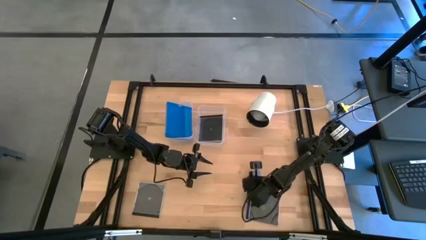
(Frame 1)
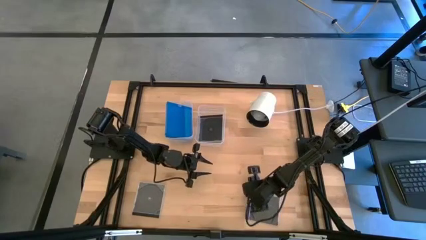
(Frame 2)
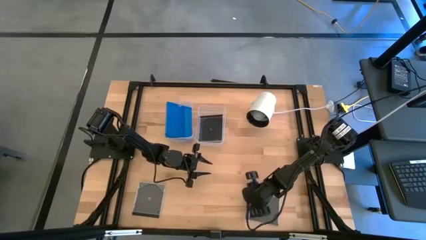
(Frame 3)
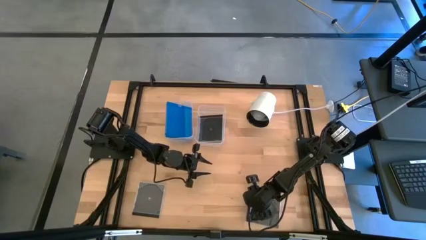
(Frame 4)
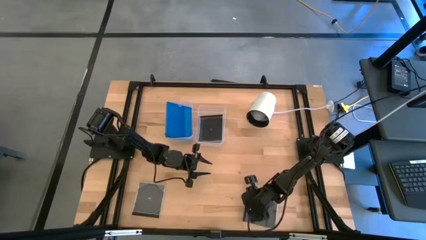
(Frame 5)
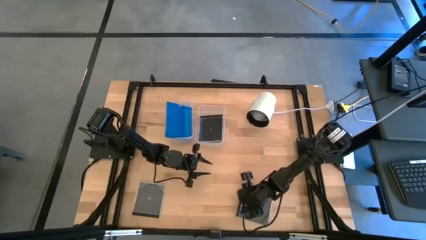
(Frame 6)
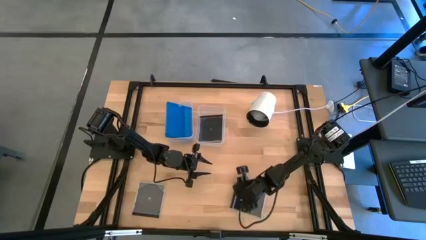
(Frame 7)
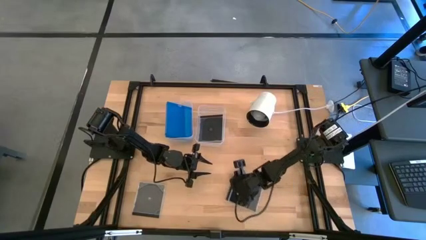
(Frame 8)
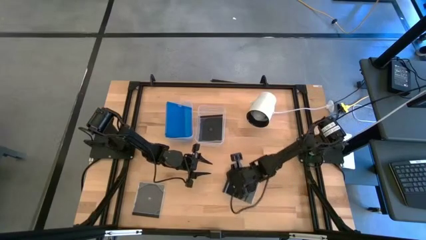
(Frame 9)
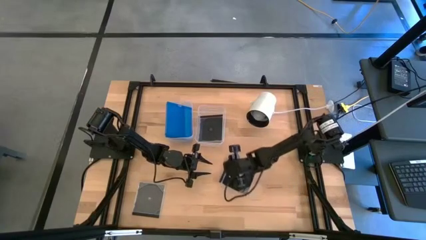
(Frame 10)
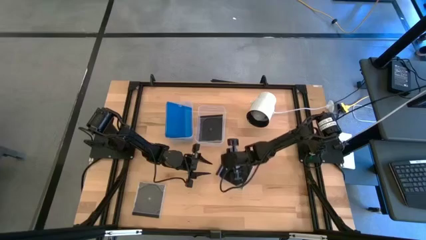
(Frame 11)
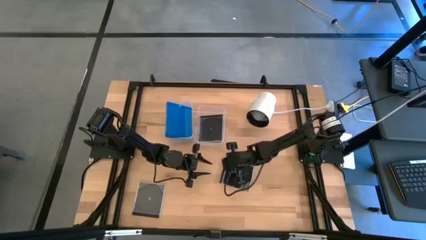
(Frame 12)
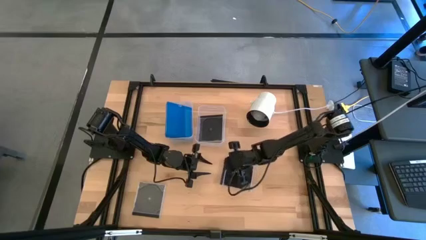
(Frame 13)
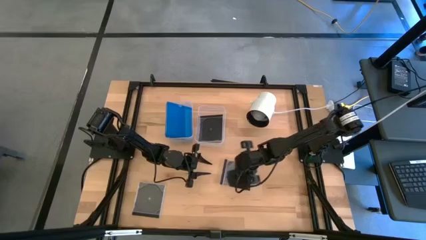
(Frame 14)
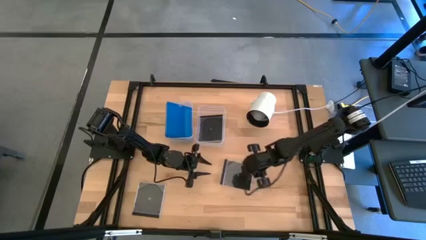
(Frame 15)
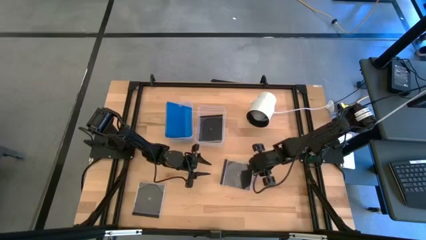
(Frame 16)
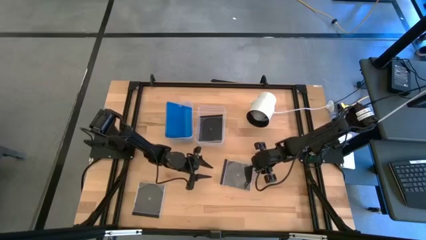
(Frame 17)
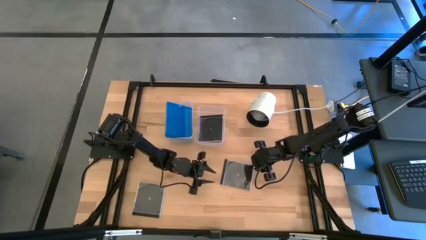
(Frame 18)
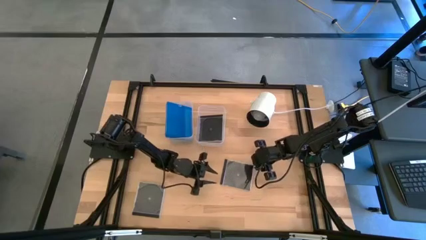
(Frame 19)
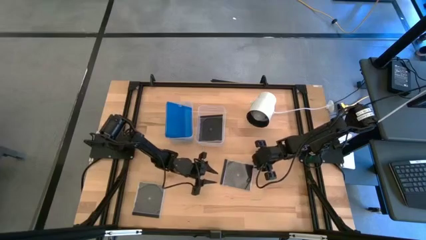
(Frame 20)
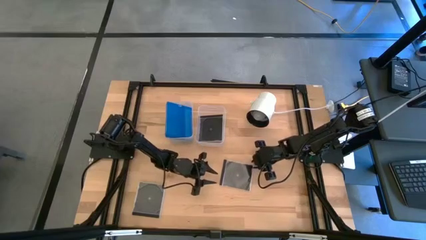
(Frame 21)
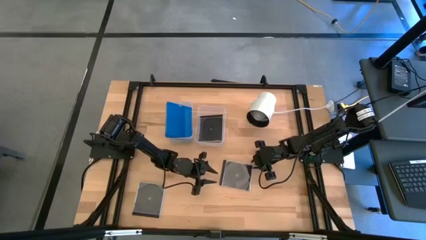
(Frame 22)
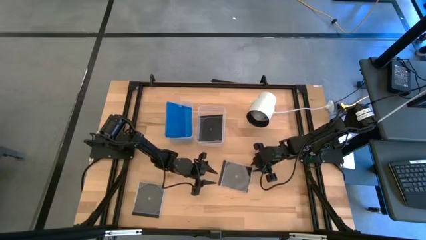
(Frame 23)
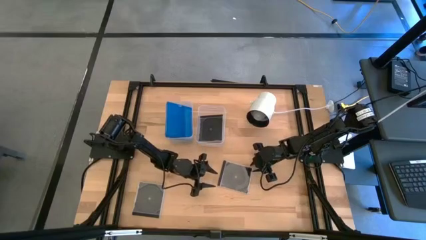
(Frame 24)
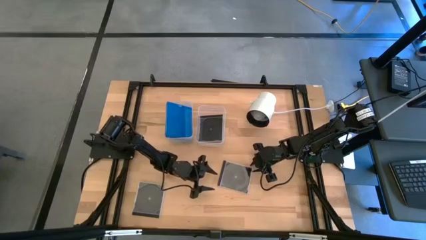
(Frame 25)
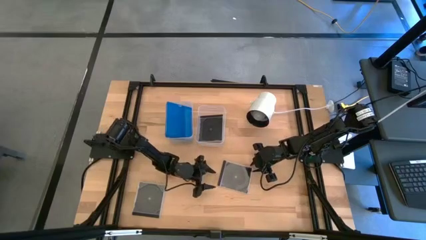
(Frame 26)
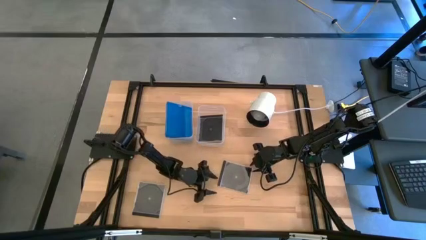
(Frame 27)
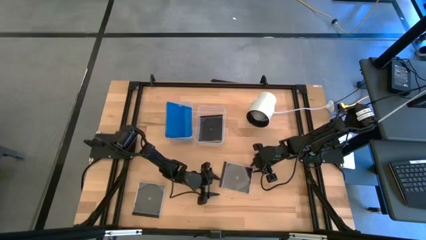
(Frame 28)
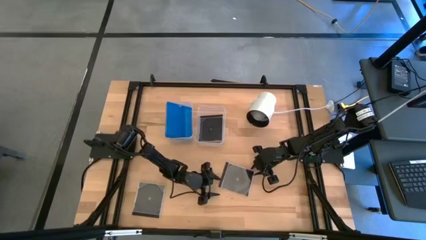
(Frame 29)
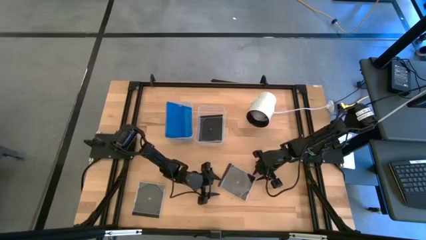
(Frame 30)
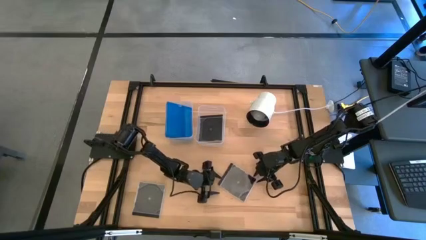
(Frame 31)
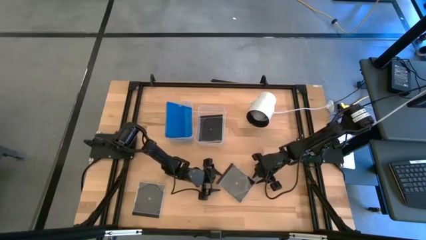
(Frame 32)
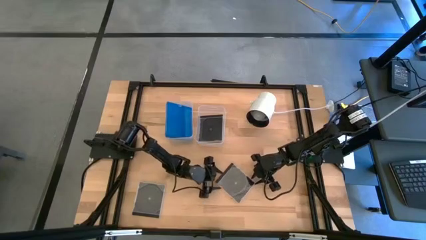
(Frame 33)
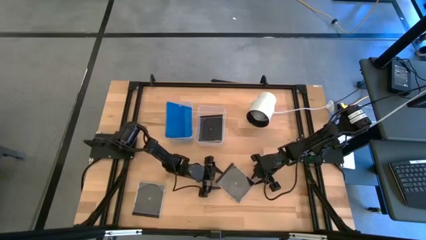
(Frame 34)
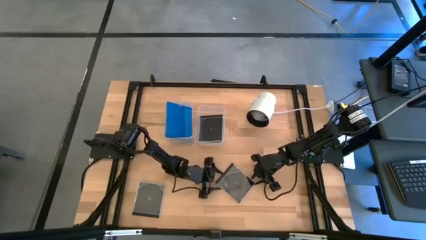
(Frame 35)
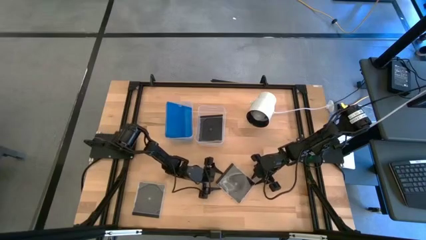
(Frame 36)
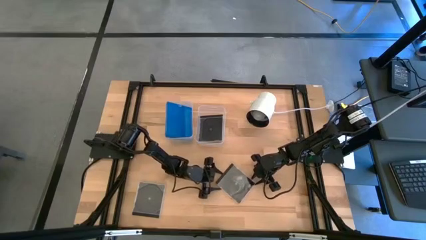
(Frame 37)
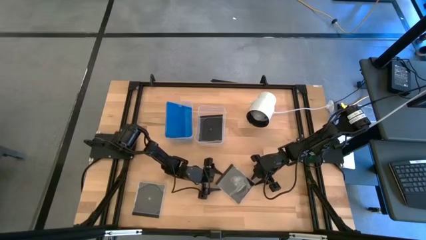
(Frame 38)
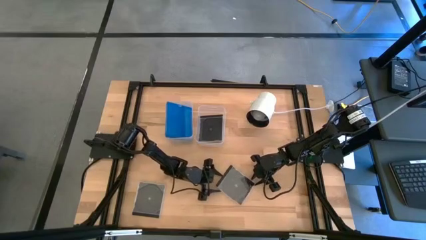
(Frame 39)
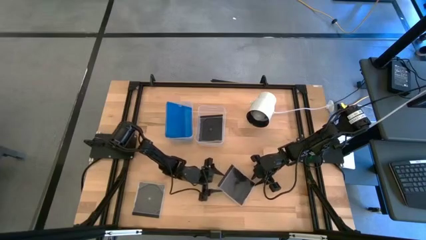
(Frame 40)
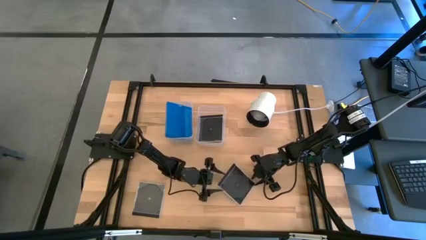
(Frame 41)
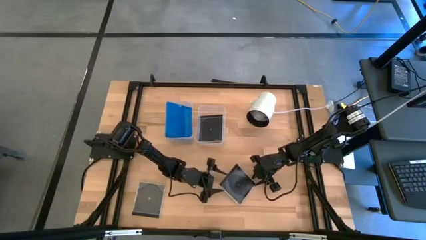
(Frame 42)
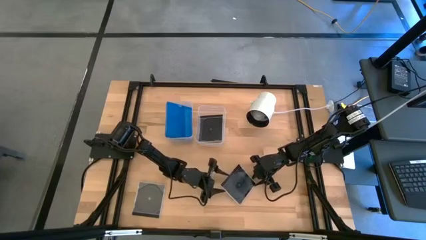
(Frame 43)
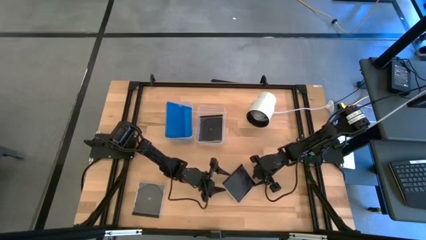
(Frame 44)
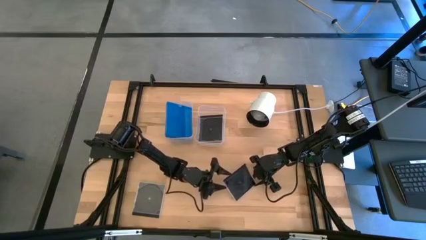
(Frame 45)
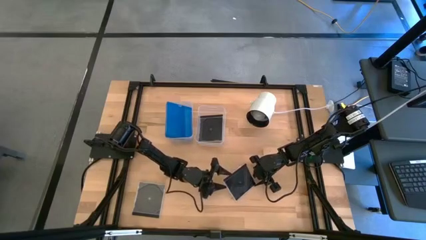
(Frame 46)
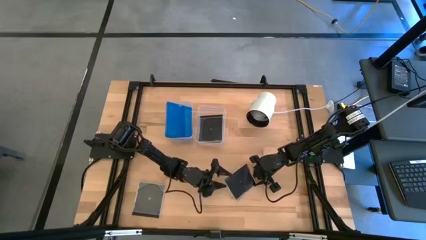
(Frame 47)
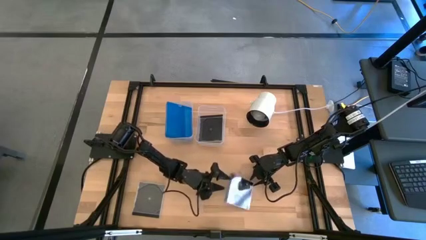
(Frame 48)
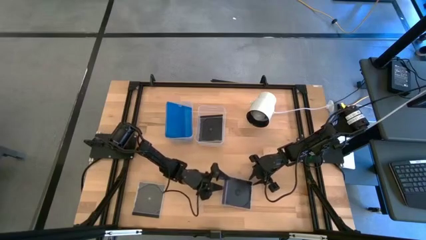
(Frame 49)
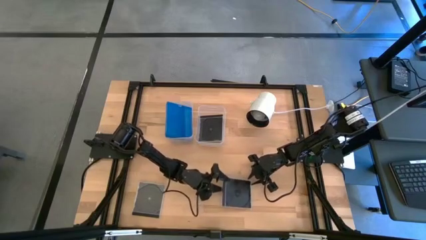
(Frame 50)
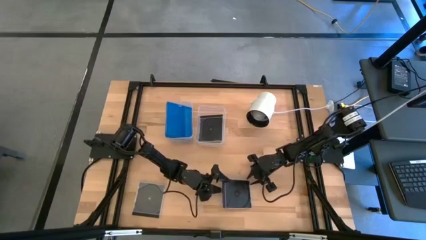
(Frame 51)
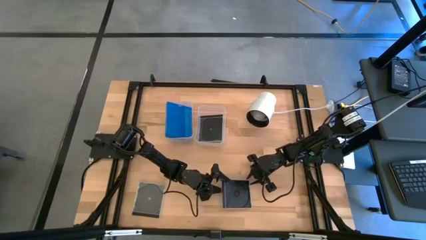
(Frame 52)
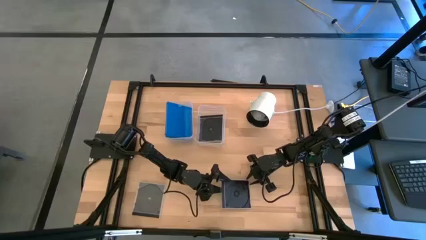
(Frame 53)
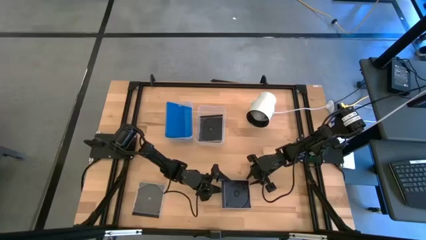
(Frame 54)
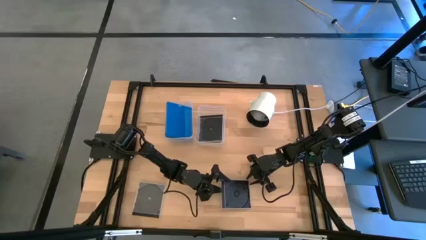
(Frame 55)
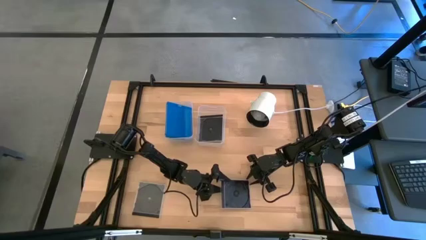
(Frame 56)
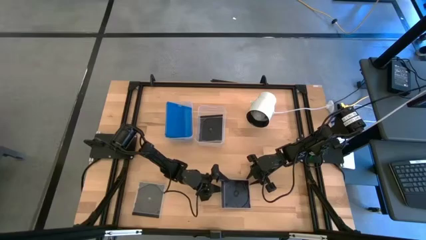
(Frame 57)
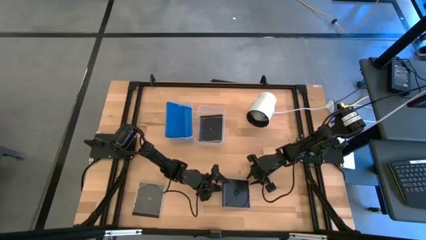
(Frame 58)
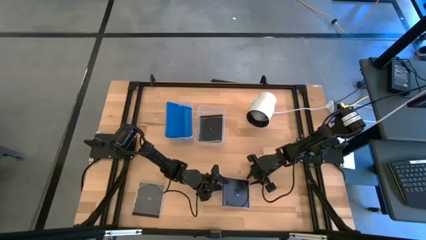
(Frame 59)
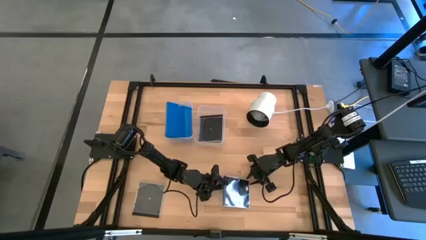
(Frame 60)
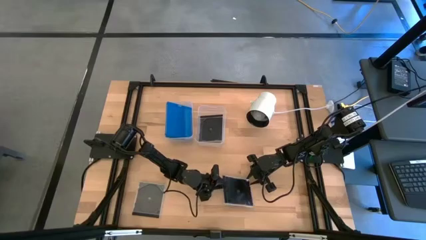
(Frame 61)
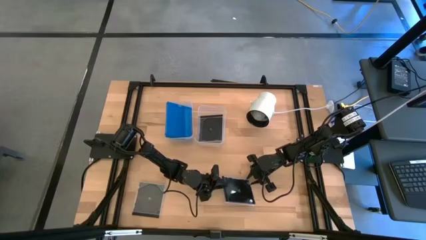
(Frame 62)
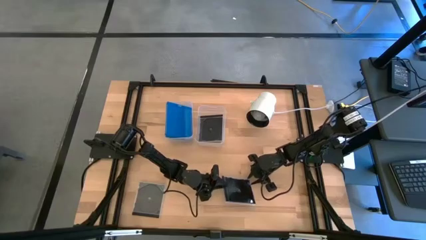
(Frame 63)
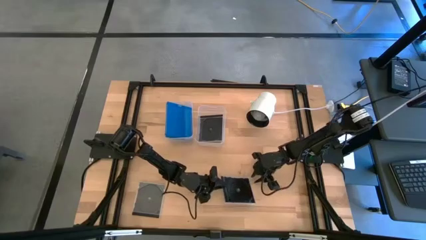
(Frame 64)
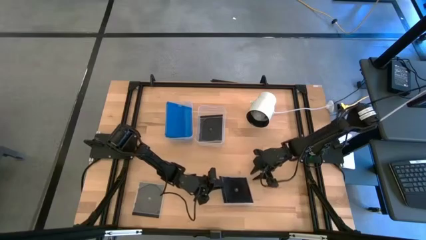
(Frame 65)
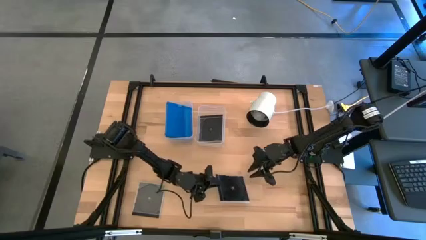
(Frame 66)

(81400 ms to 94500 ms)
Task: Pick & place jewel cases by type
Put the right black cd case into the right transparent bin

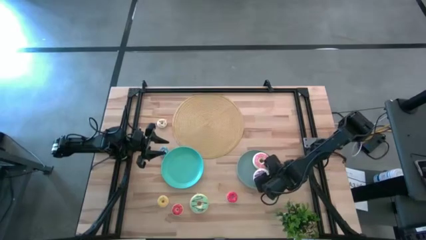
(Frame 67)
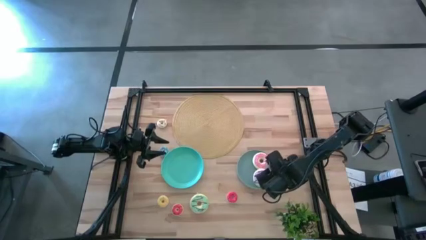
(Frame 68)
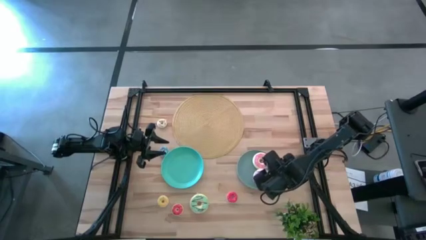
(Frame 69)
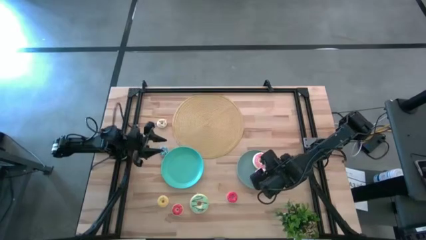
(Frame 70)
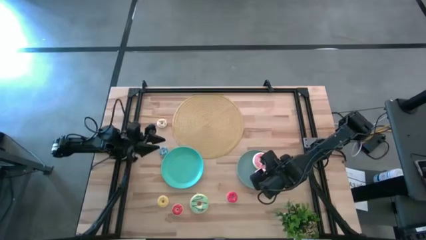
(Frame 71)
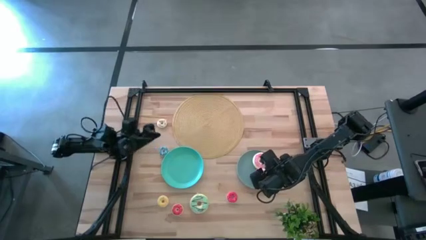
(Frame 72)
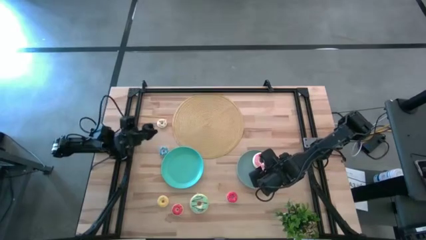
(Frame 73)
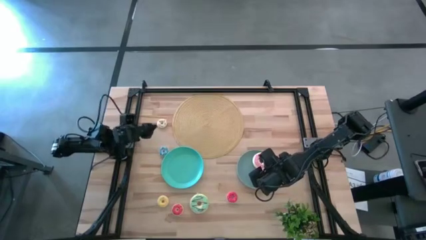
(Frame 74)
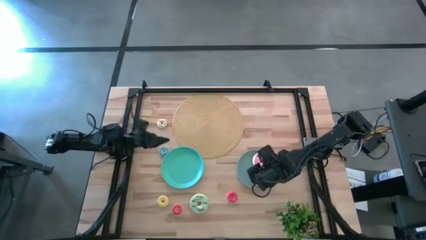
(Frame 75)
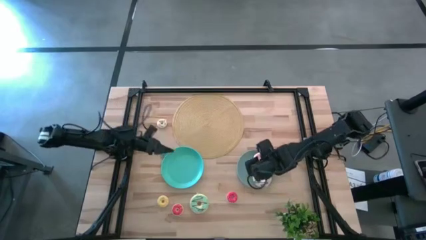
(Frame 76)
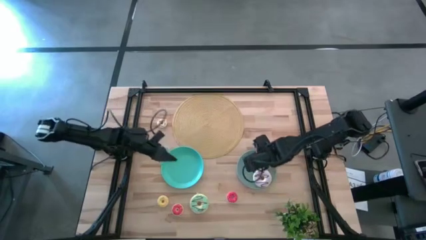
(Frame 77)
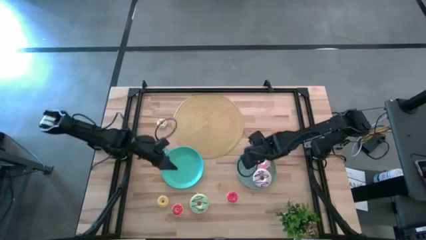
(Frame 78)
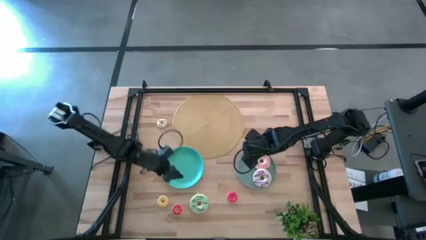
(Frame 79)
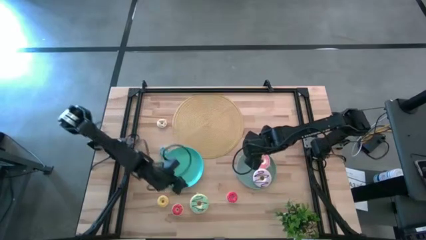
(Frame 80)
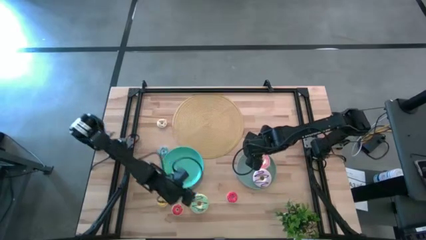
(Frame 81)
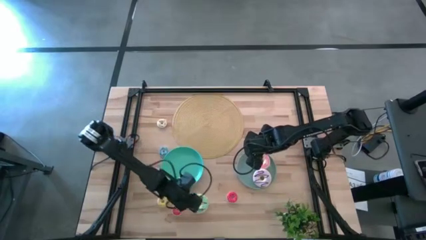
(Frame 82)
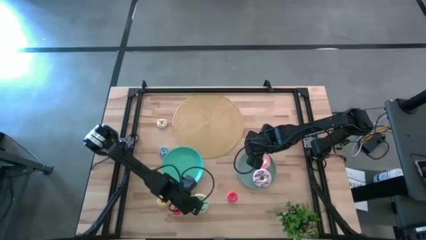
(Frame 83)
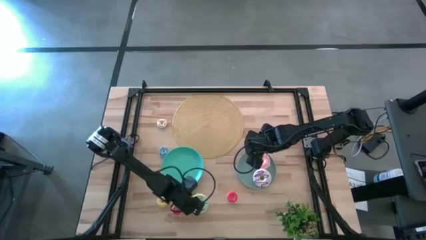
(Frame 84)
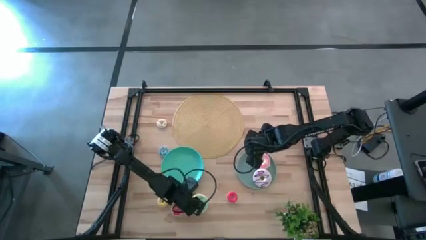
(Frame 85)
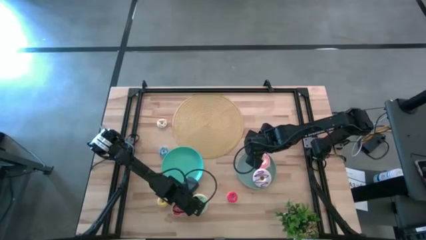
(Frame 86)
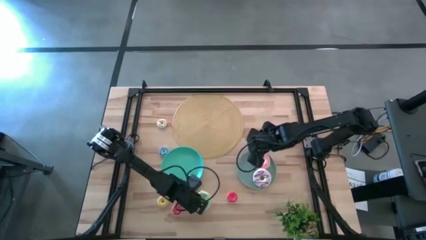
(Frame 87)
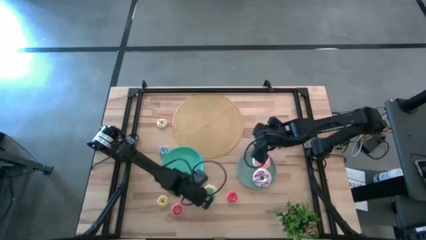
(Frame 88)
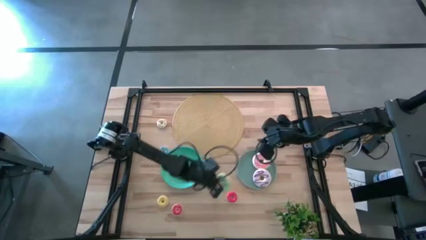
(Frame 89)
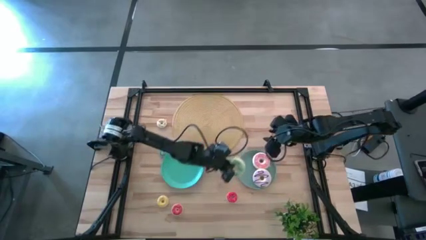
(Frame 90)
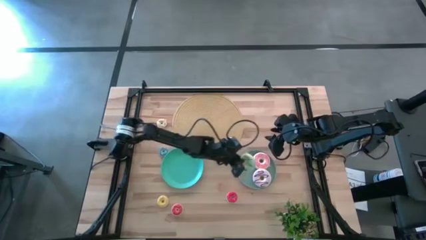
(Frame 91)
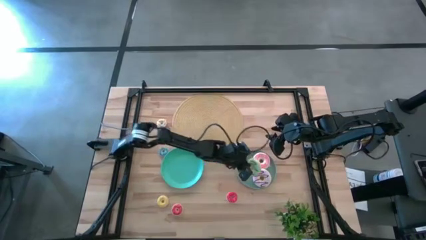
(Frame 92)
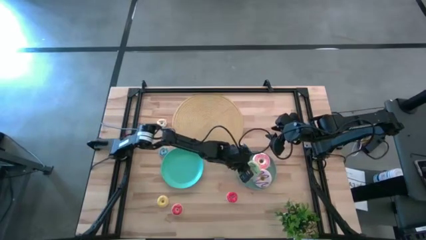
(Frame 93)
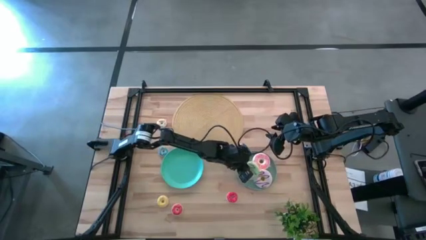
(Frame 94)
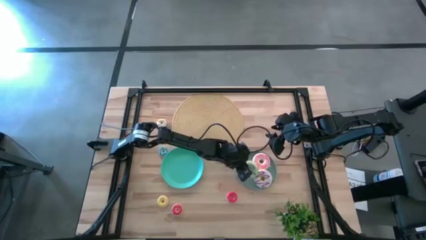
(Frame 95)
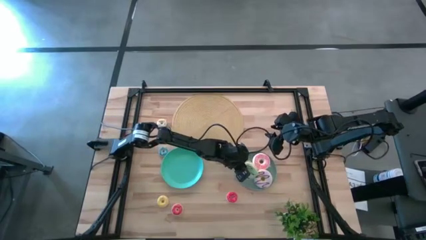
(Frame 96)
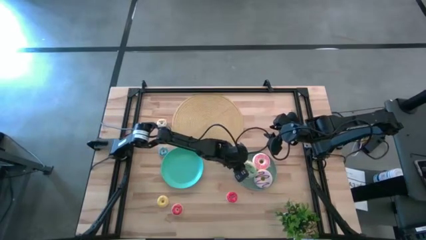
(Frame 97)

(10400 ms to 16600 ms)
Task: Pick & Place donuts
Put the big green donut on the blue plate
